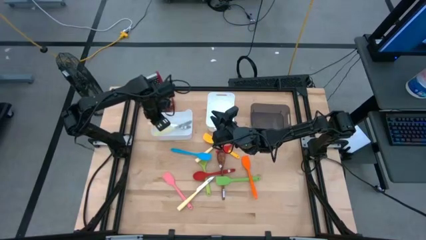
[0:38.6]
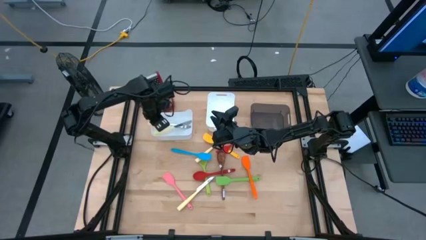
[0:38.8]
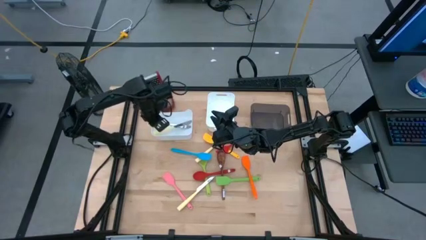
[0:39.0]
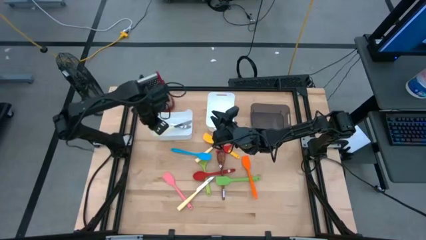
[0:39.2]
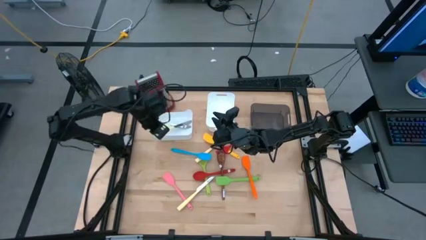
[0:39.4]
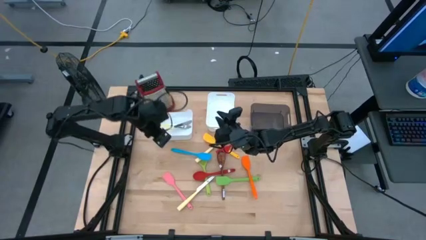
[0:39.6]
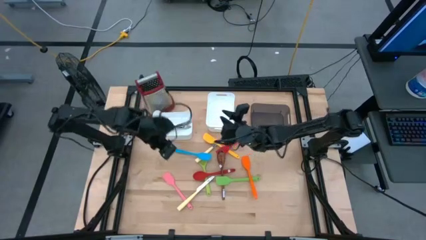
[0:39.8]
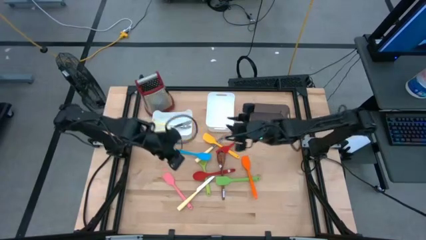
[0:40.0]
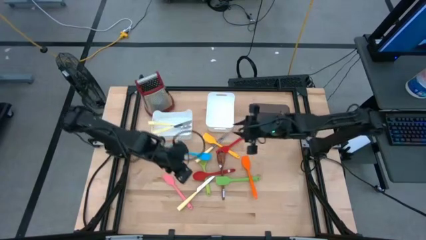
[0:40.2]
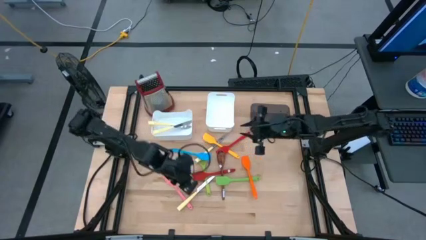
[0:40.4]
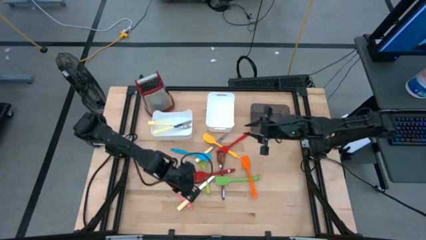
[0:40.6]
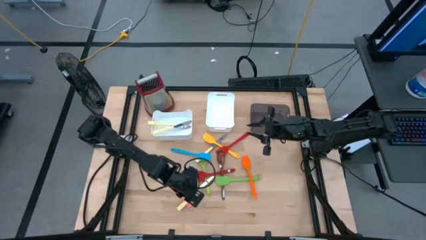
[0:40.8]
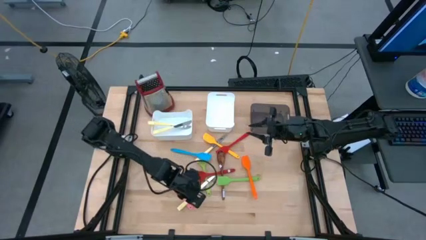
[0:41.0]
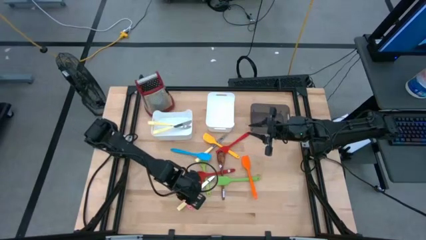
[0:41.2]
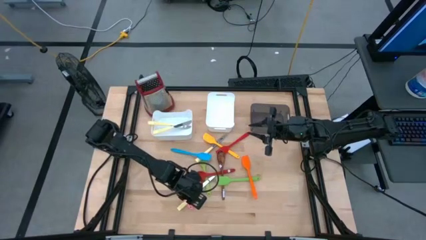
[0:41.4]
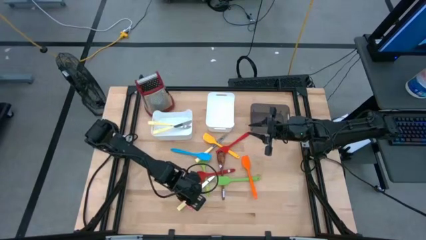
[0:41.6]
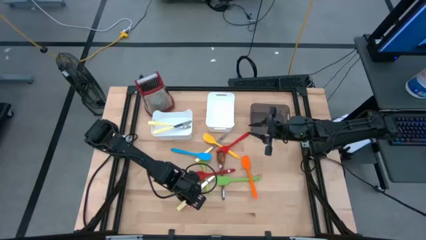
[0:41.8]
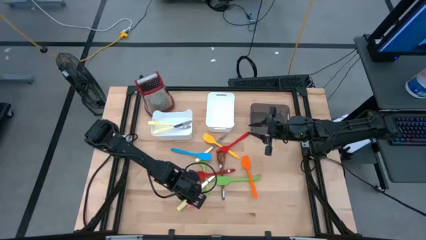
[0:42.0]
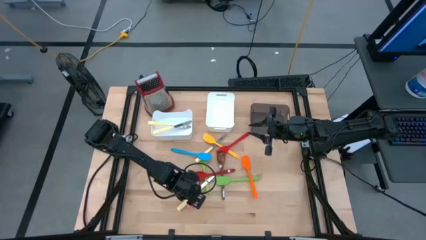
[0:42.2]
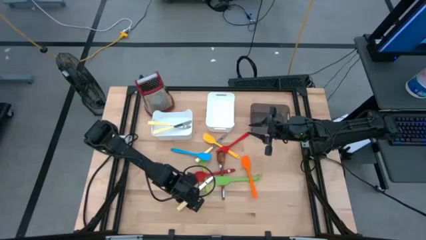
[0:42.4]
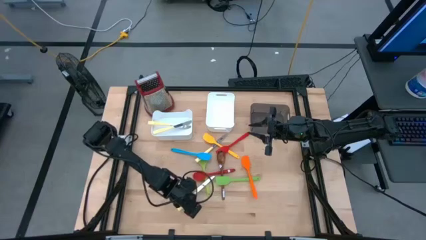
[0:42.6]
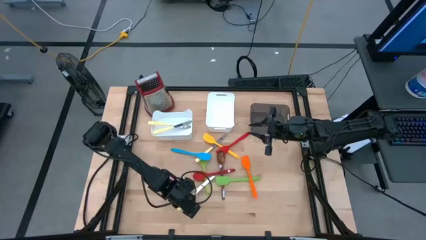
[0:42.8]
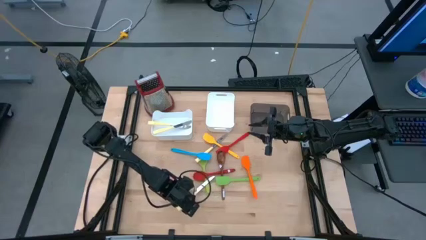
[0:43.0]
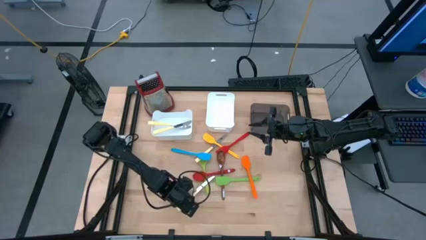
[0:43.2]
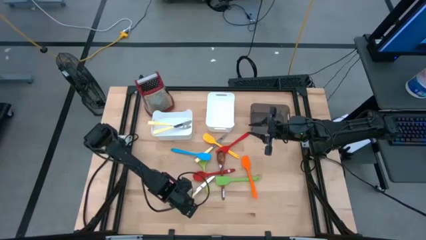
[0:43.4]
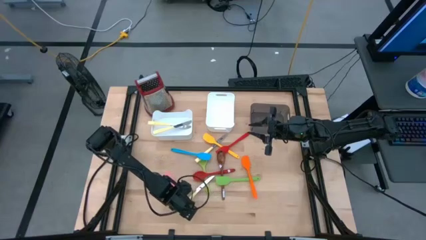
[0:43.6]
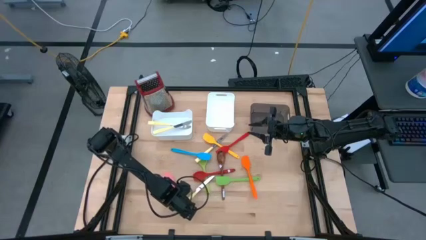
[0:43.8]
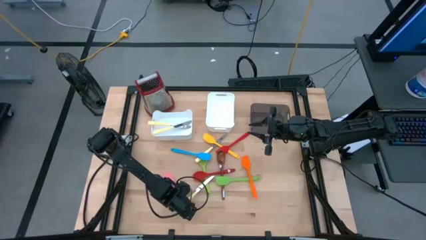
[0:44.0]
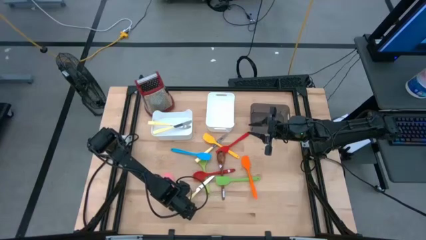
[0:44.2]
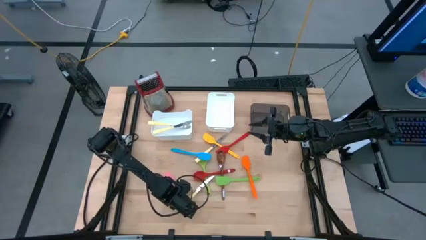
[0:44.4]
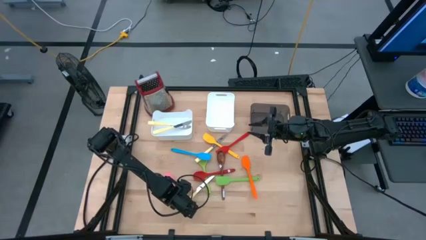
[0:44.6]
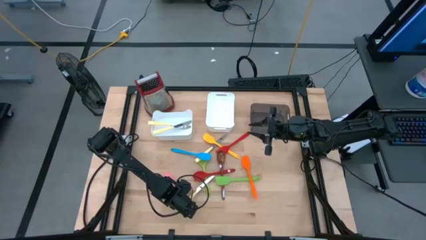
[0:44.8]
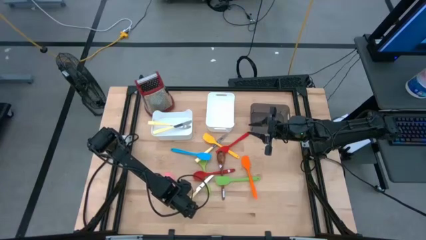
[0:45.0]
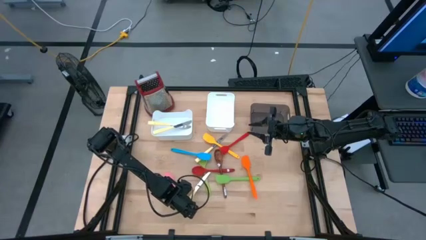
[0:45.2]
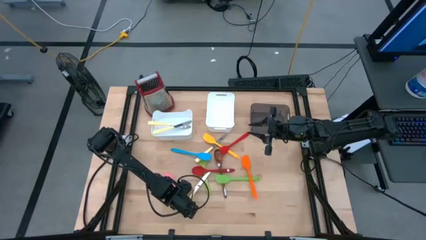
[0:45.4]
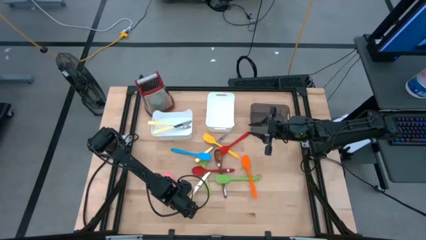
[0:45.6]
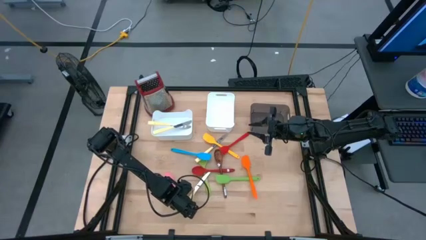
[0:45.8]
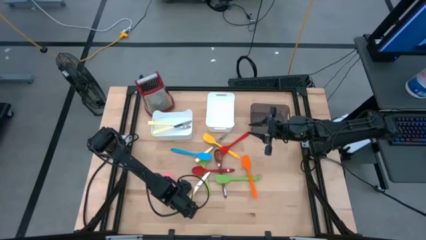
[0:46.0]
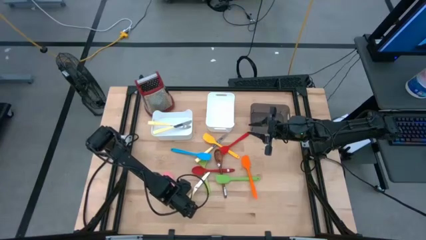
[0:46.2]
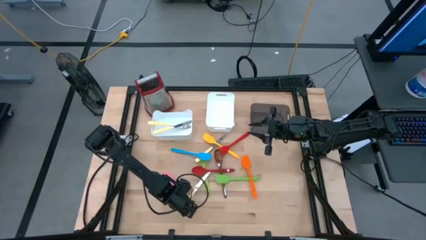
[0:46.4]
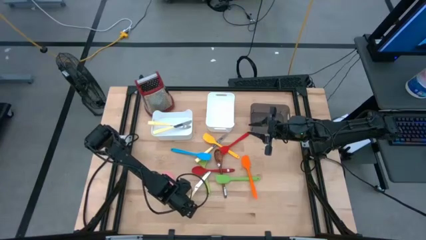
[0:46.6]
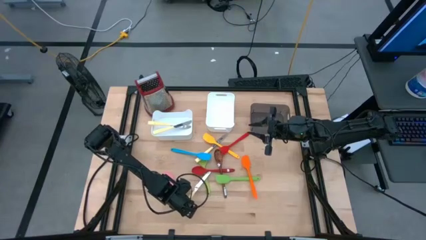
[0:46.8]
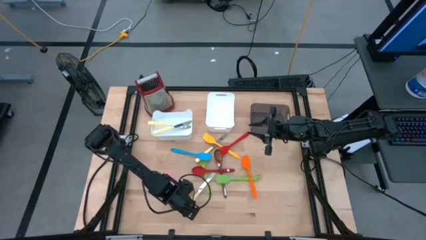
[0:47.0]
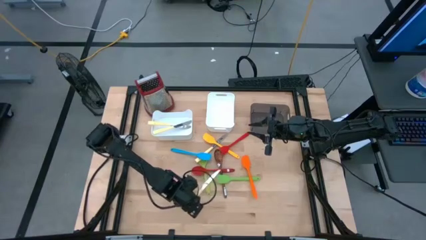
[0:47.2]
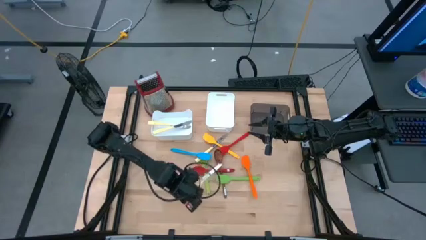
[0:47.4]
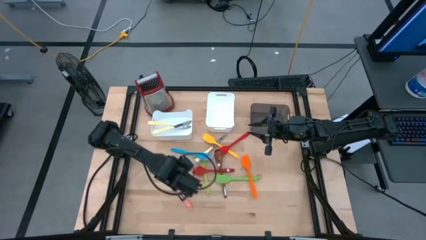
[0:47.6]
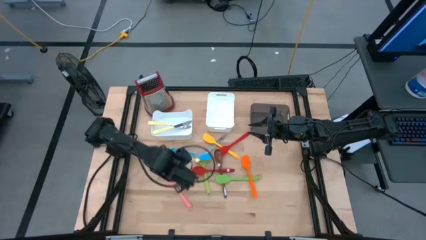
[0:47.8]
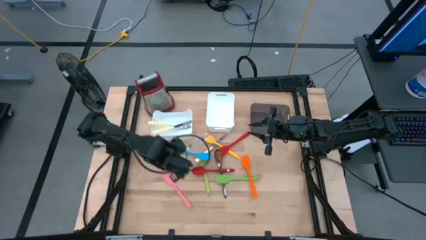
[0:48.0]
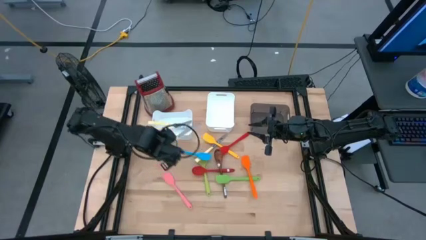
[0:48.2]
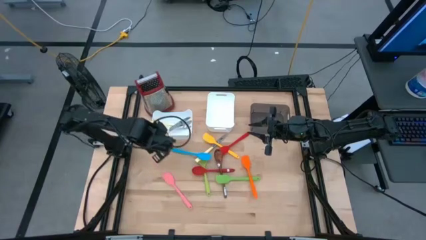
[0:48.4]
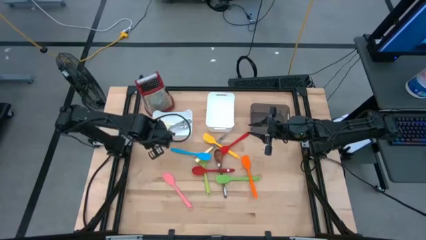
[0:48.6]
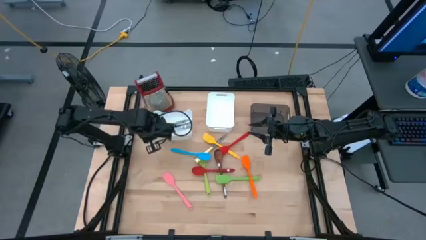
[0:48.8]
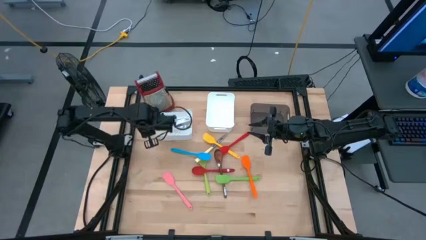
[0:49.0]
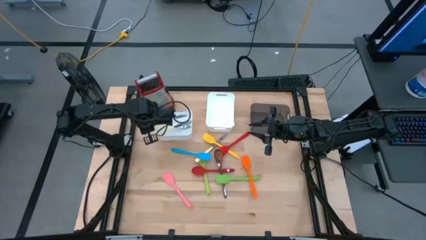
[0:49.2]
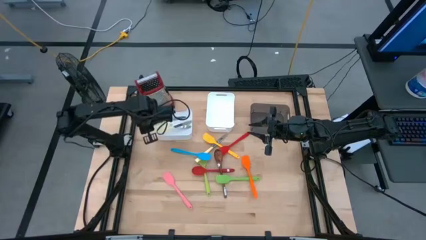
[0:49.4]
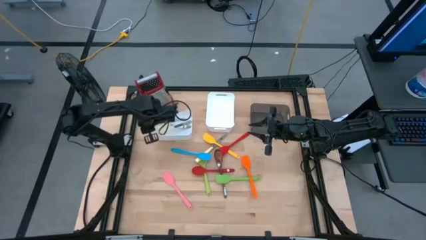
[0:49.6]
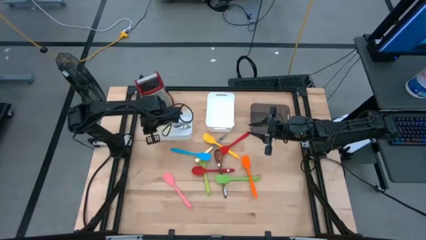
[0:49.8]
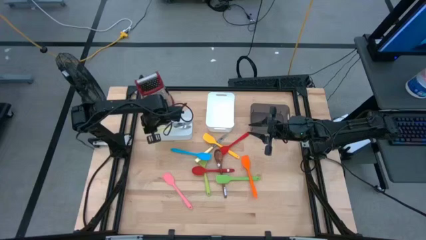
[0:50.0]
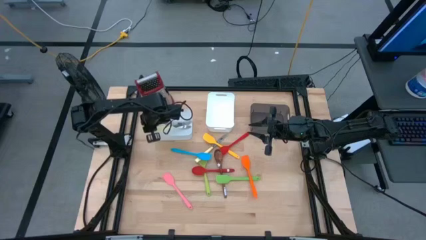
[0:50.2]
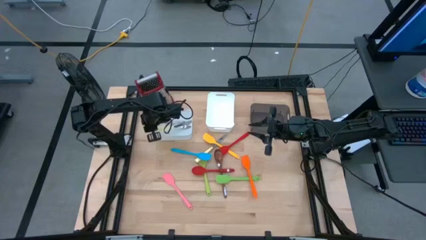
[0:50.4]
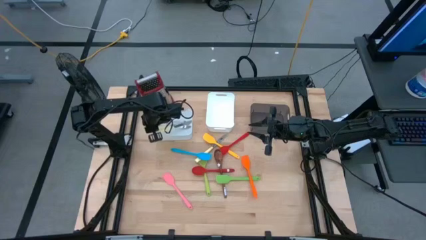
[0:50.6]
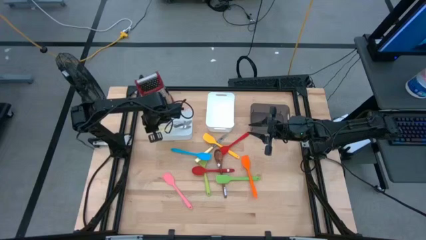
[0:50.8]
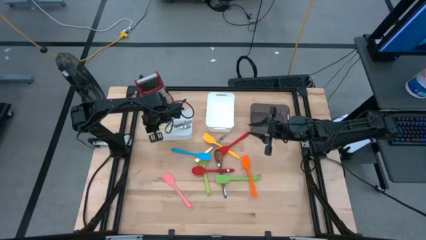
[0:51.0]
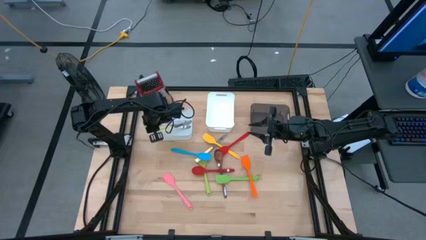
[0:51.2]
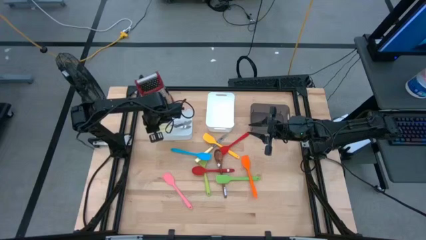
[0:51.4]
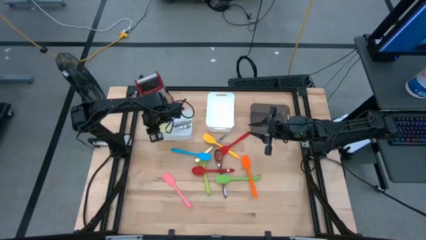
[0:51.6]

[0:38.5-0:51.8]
Task: Pick & Place Kitchen Items
Put the yellow knife into the left white bin
